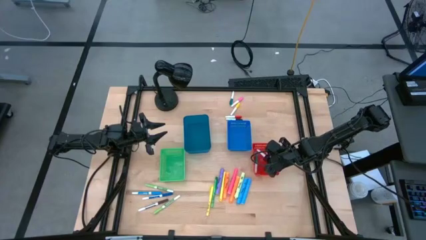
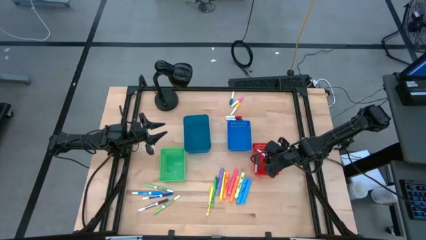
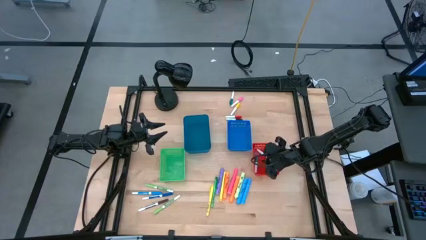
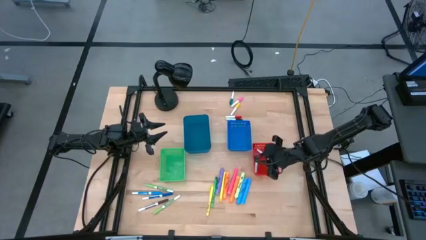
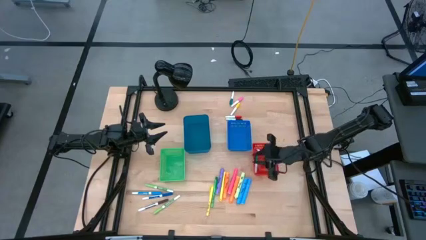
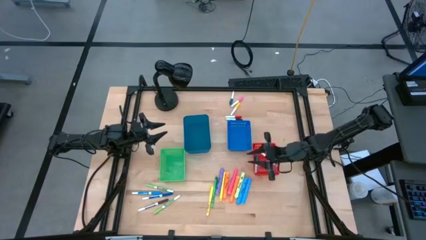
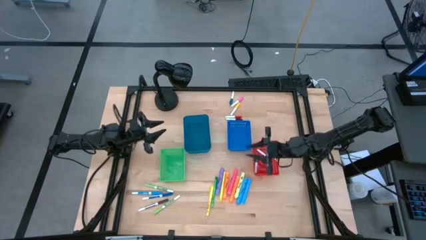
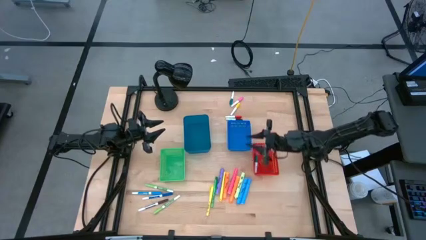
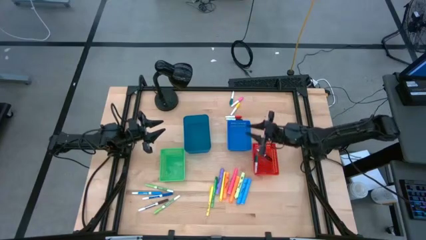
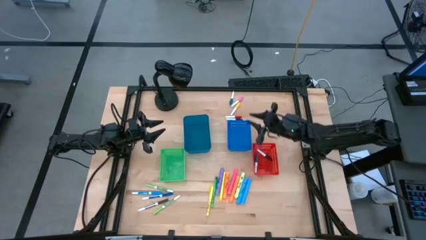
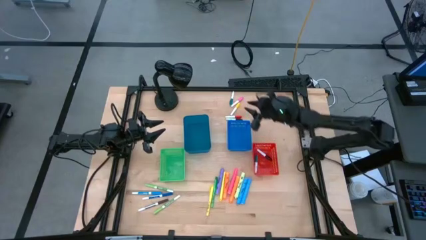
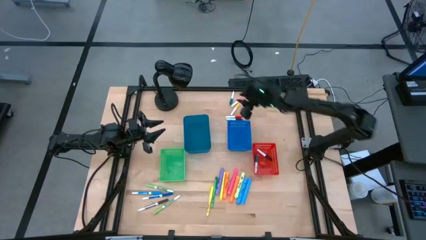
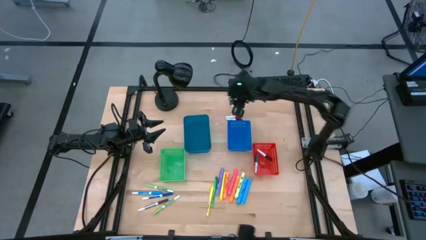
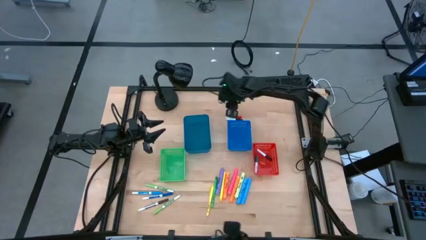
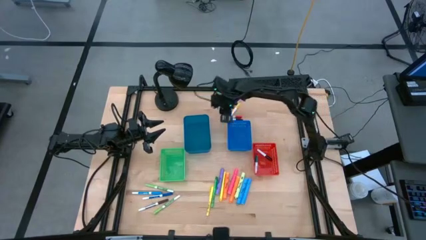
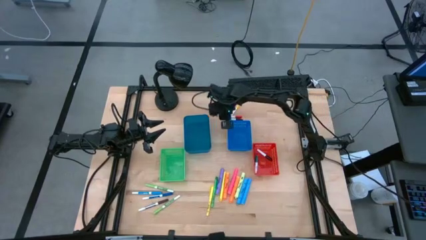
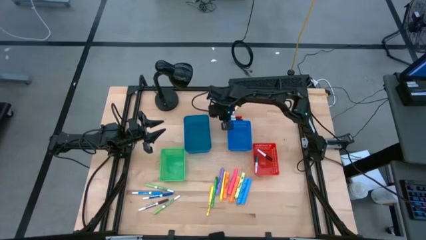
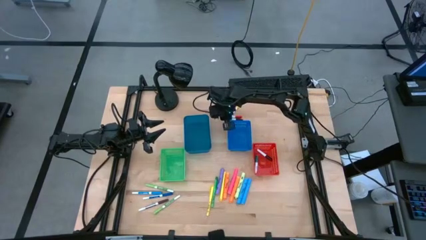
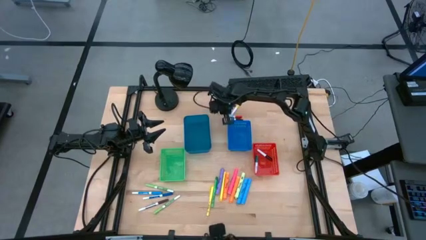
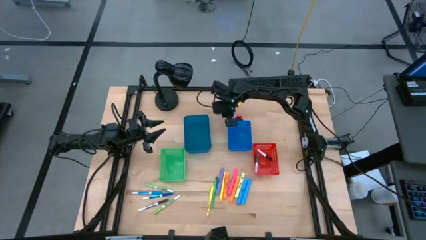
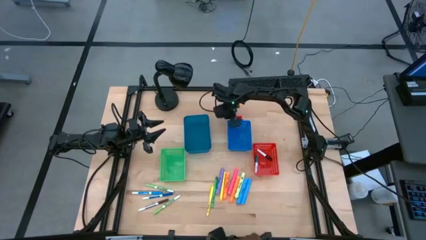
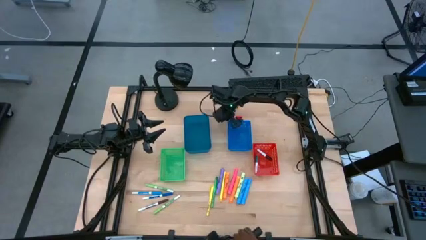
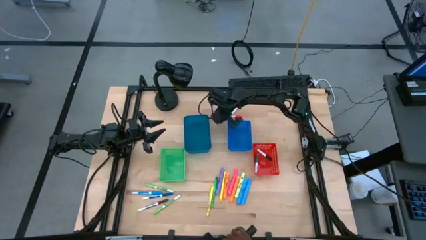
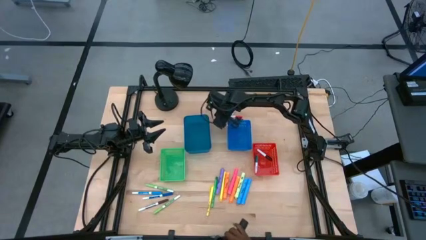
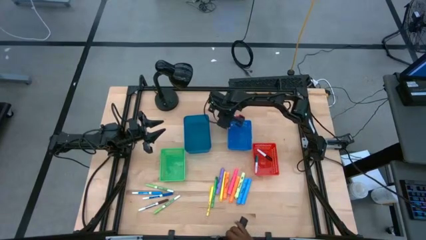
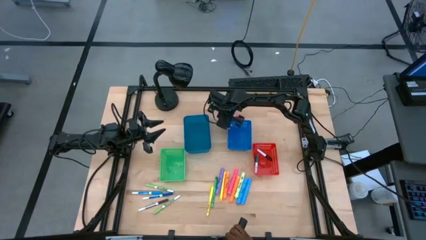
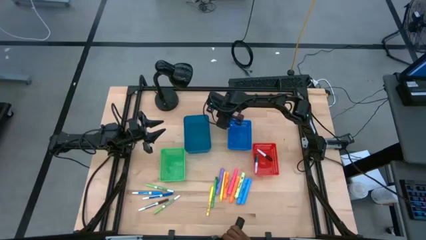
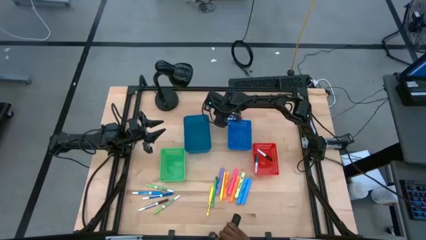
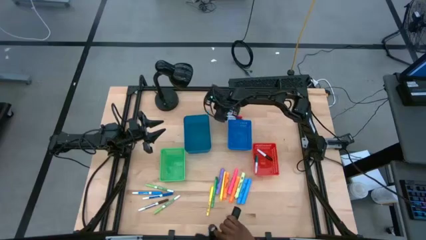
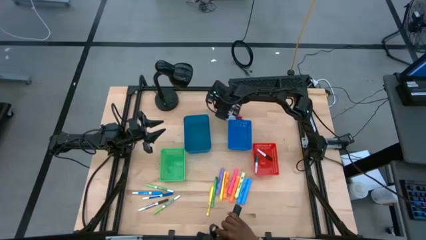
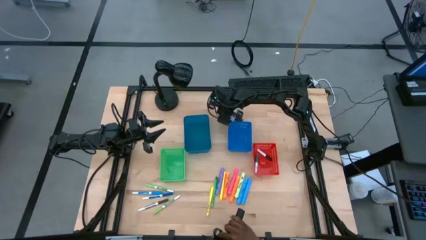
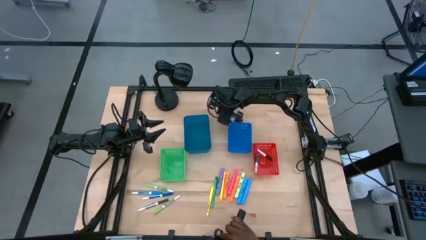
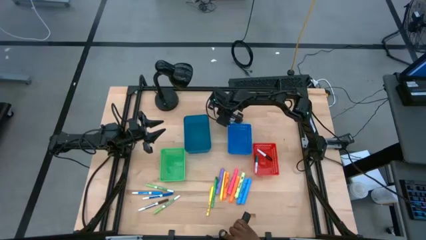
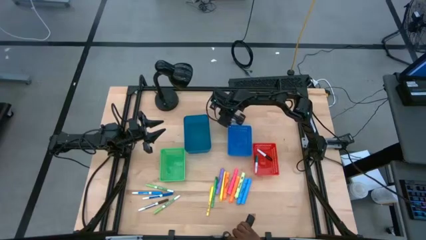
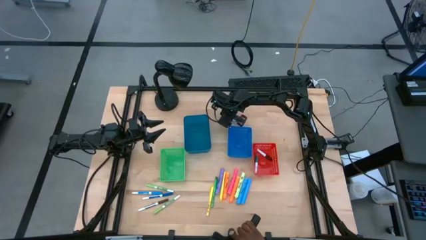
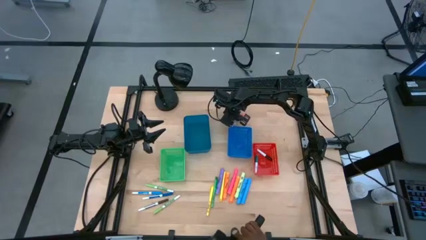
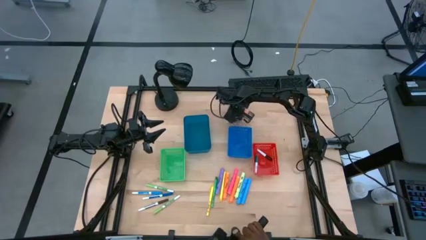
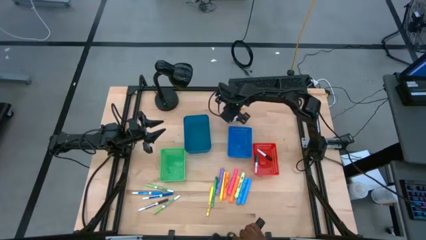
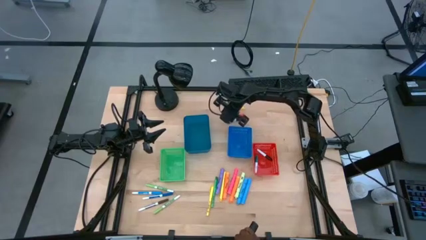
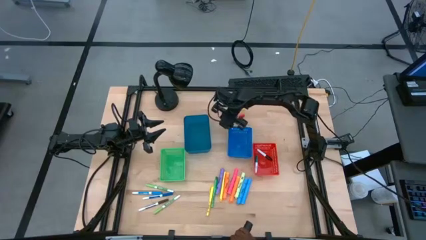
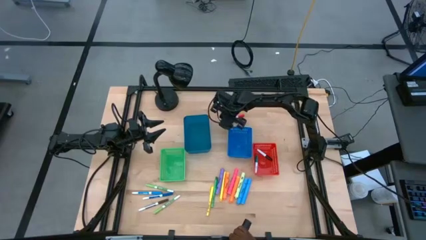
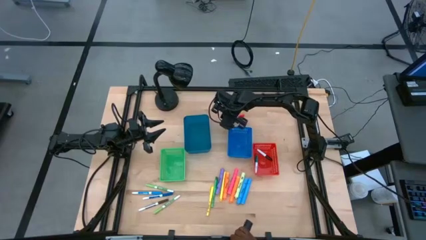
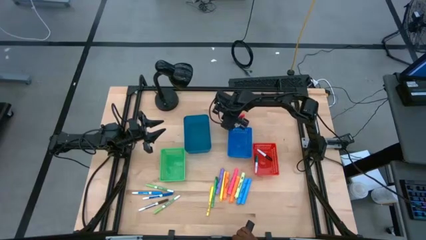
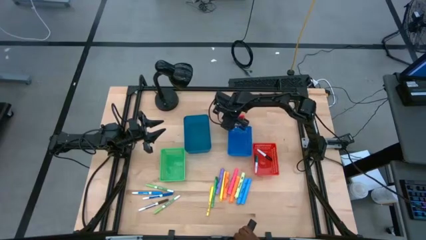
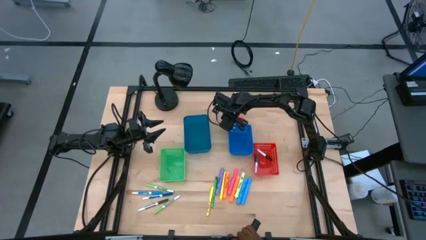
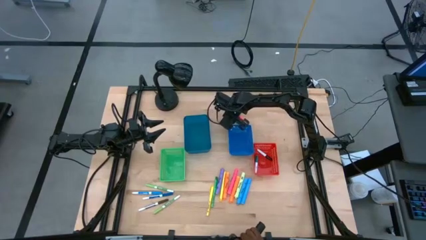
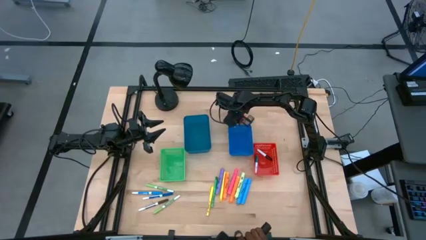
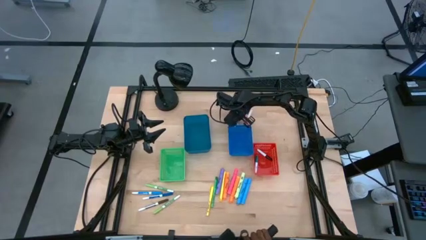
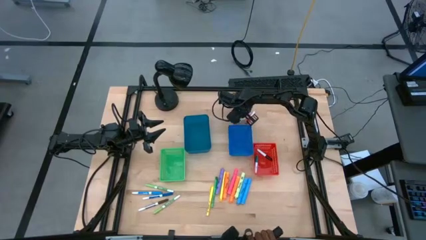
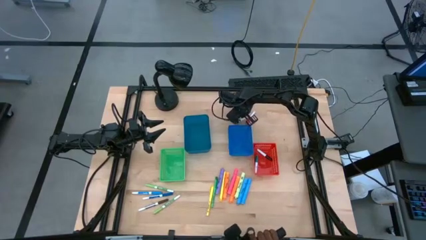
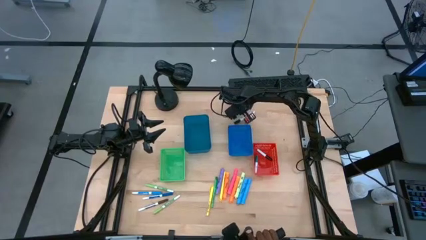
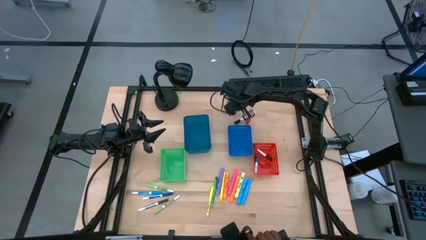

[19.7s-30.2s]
Task: Pick & Place Markers
Adjust the top highlighter pens

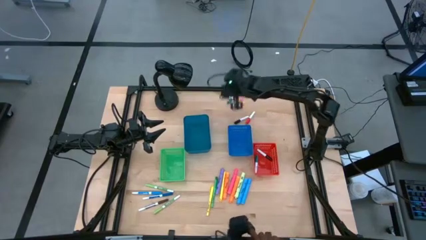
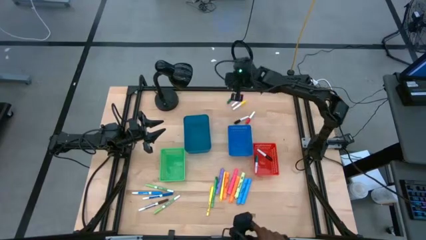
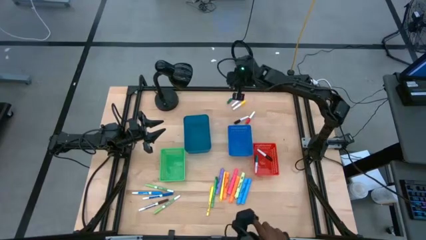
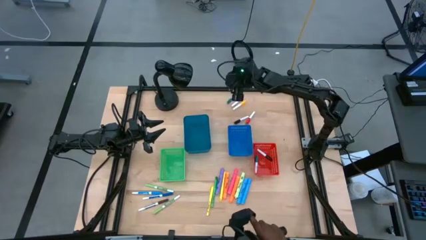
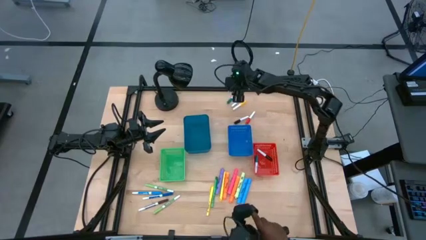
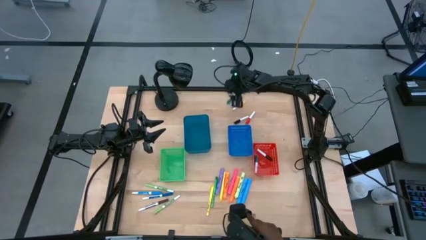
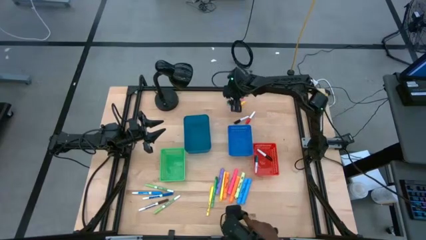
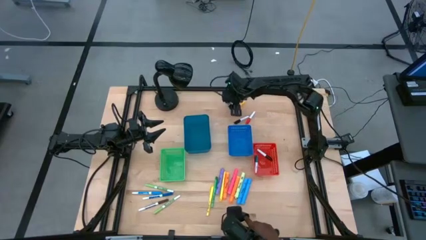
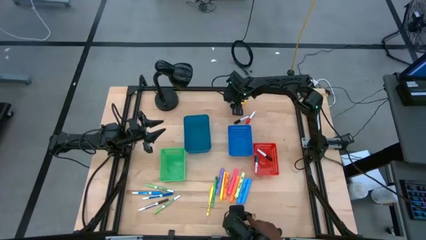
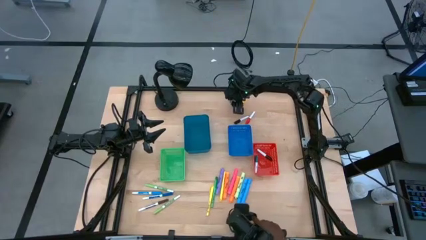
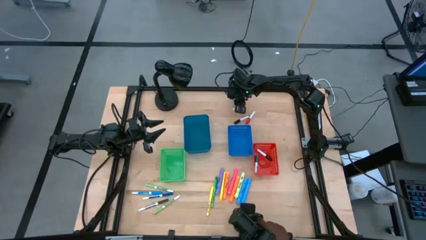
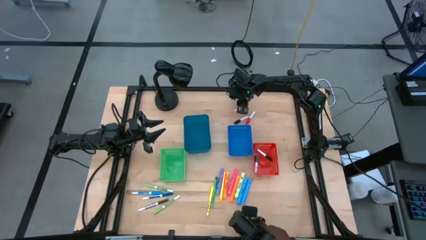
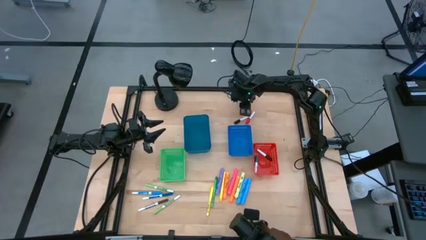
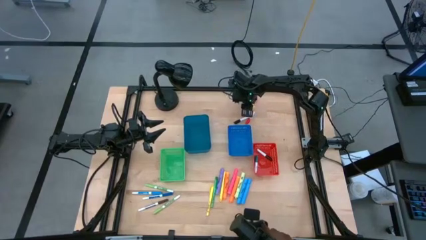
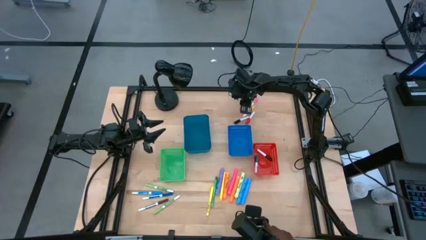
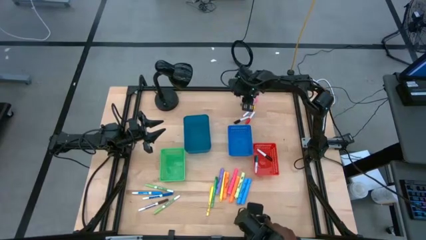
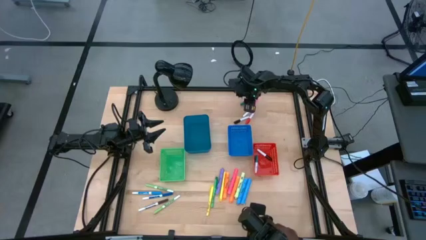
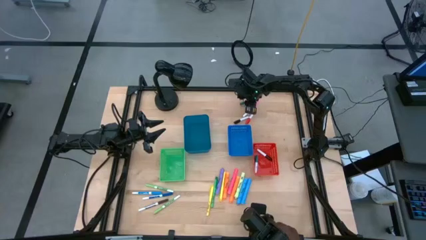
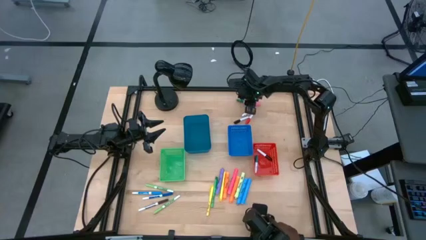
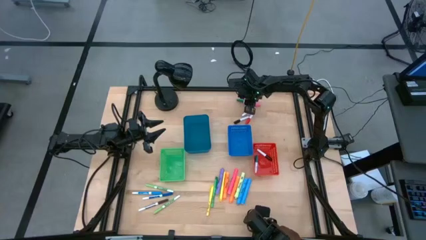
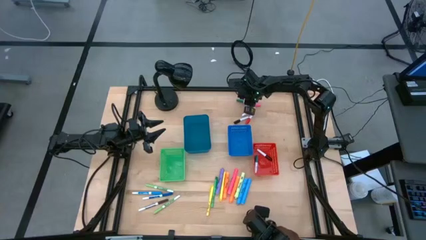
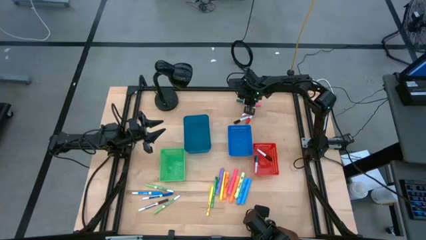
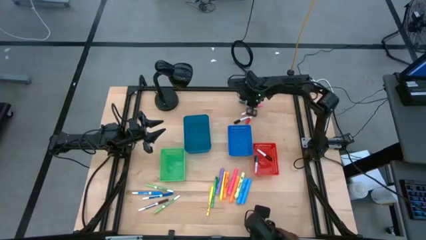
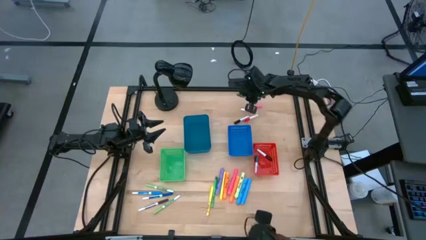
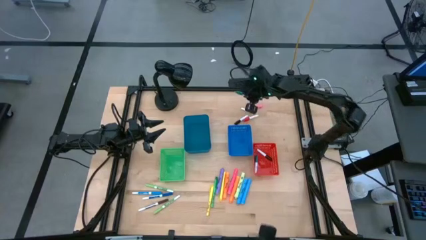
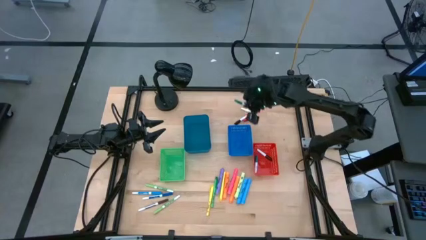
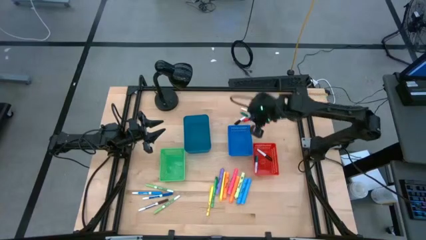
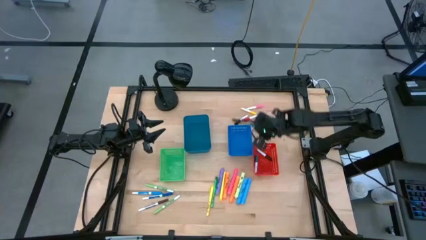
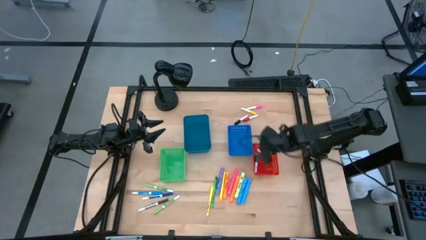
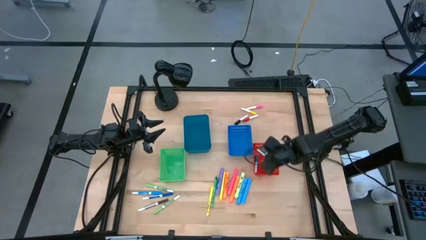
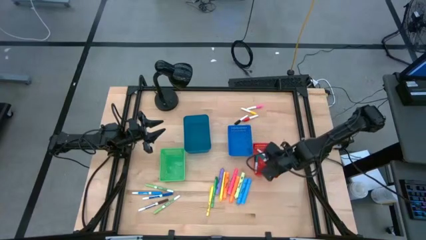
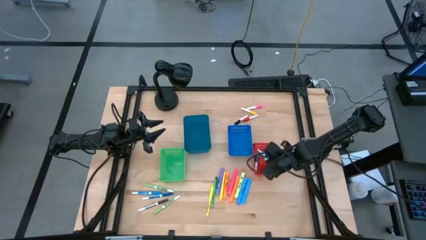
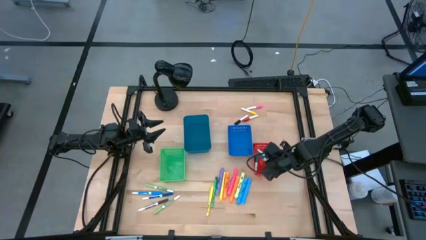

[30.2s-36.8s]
Put the green highlighter pen into the red bin
